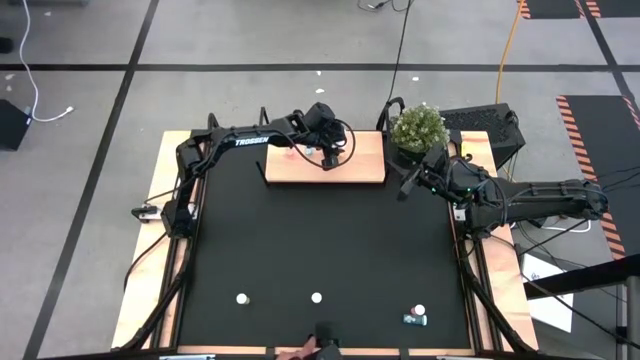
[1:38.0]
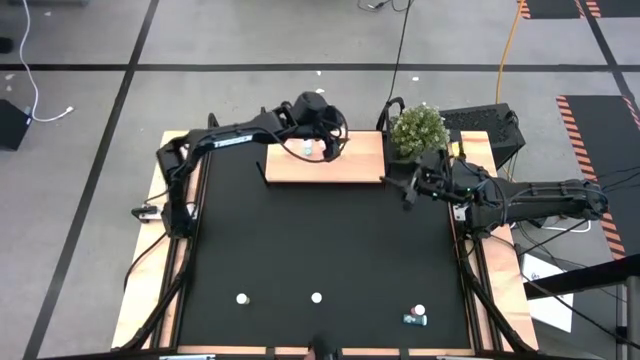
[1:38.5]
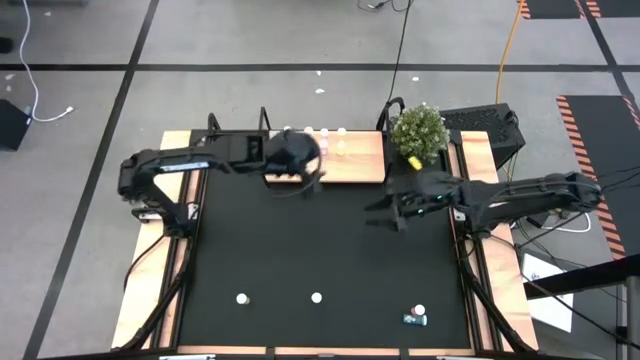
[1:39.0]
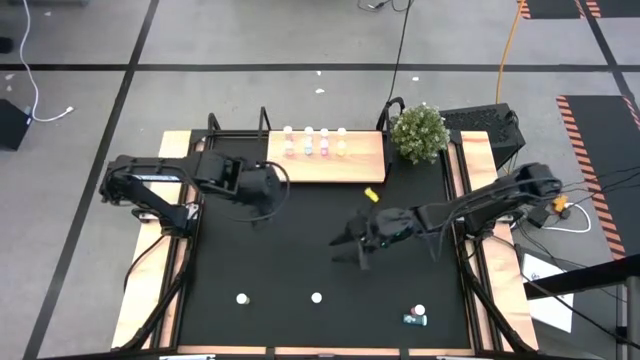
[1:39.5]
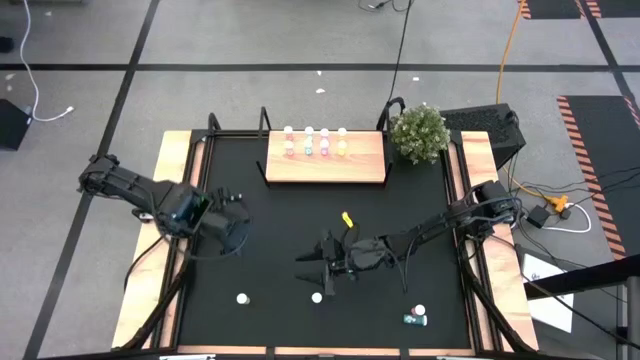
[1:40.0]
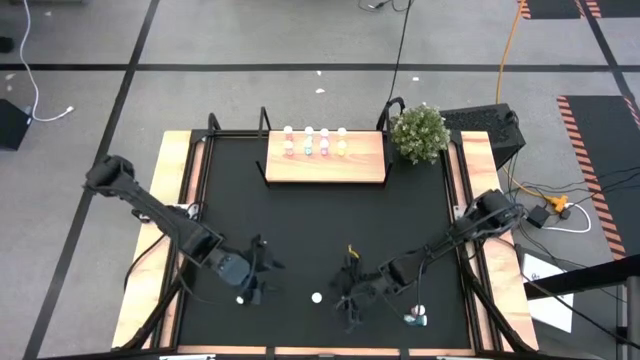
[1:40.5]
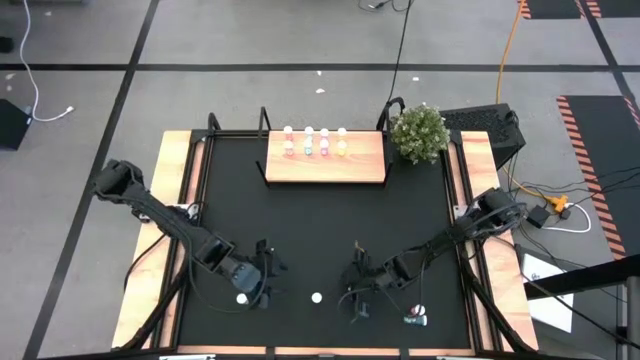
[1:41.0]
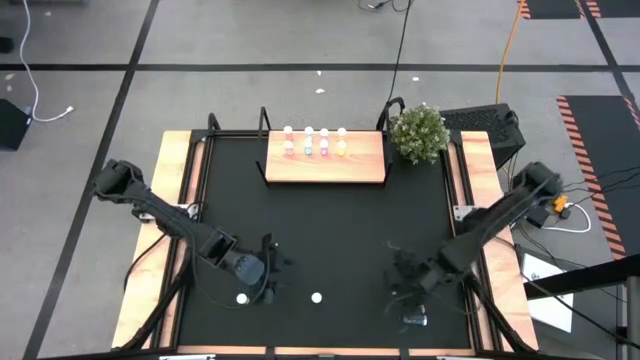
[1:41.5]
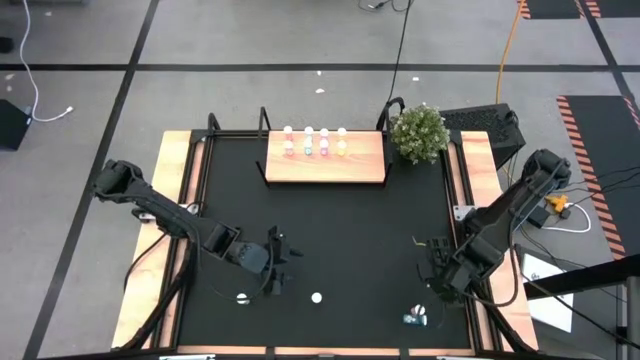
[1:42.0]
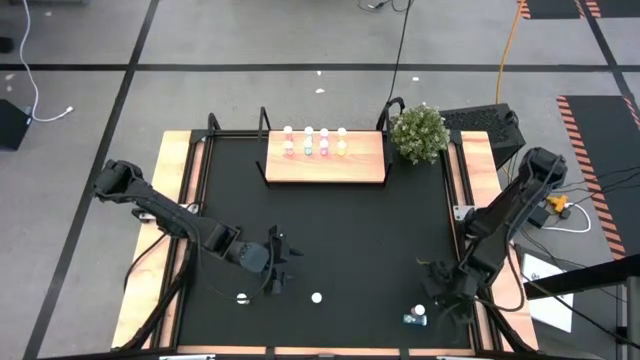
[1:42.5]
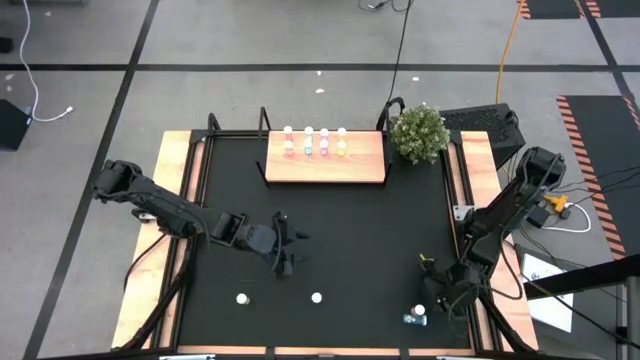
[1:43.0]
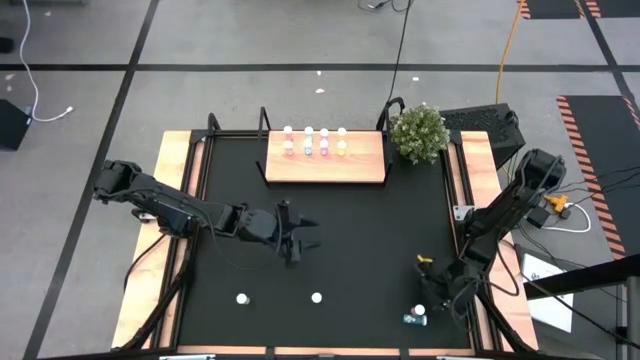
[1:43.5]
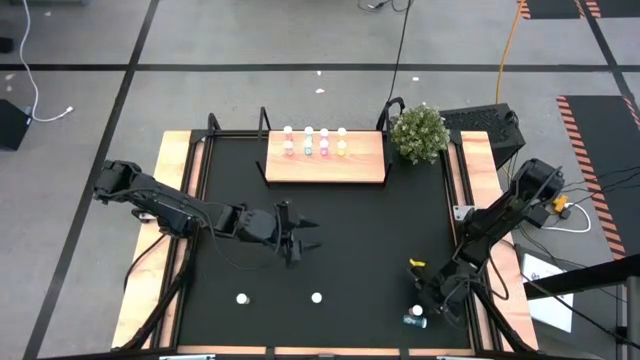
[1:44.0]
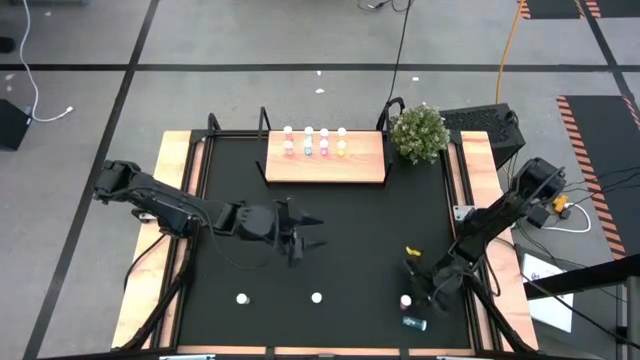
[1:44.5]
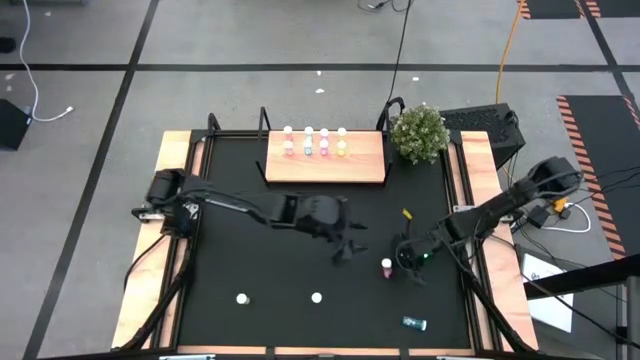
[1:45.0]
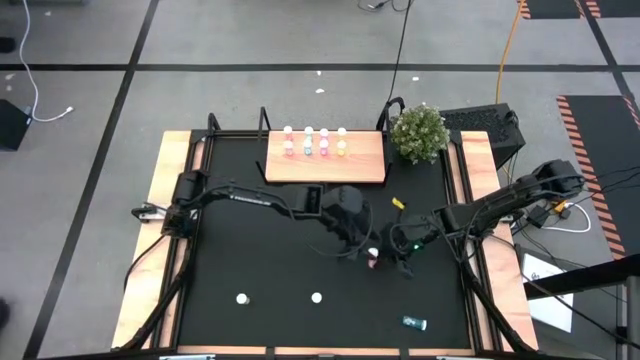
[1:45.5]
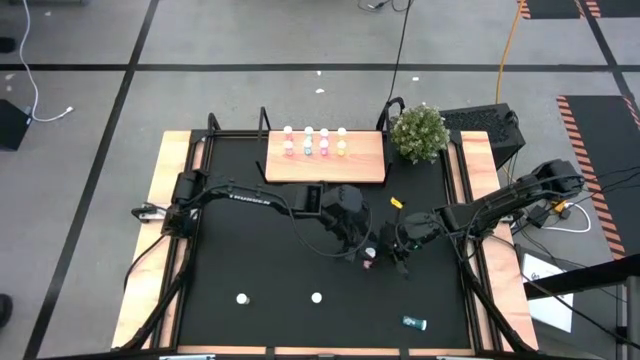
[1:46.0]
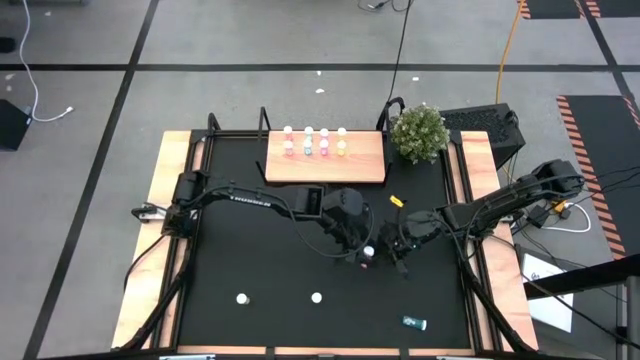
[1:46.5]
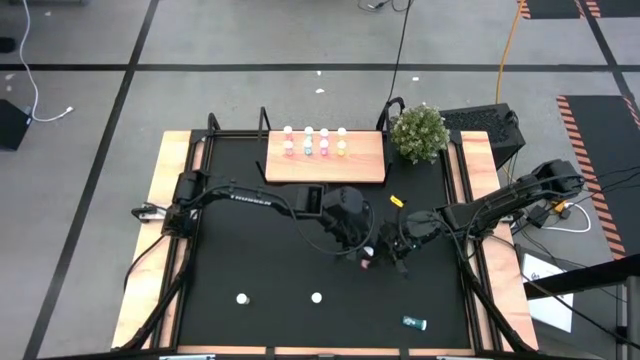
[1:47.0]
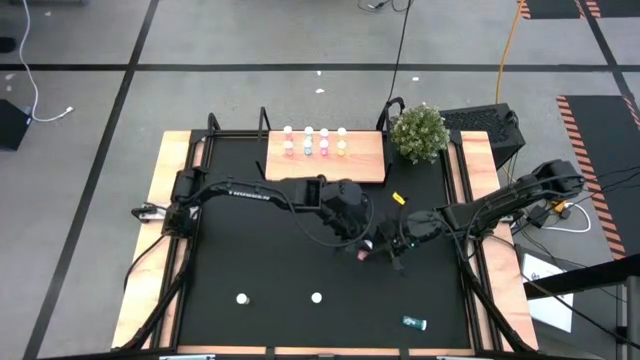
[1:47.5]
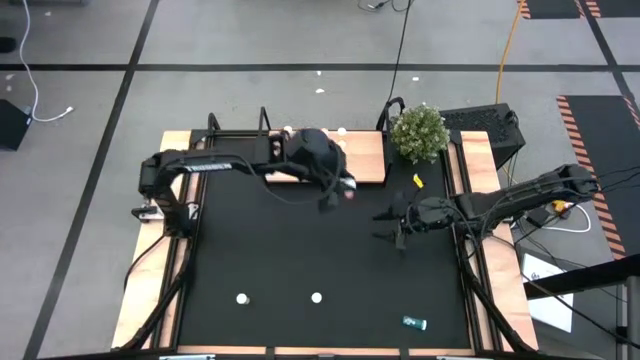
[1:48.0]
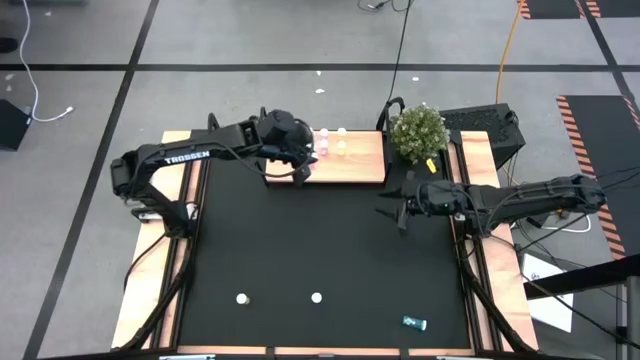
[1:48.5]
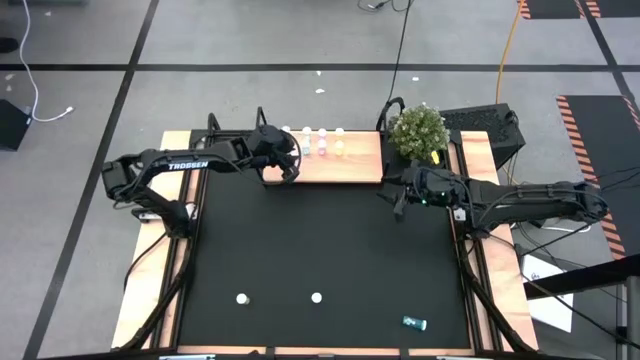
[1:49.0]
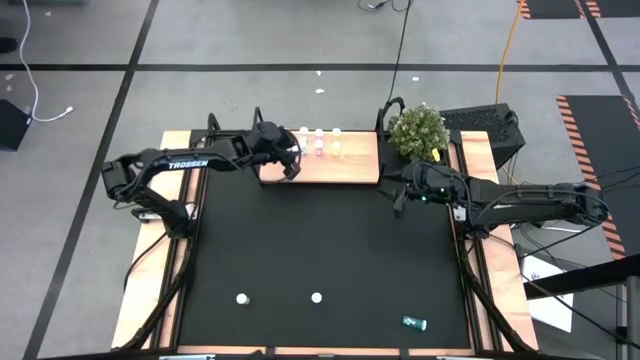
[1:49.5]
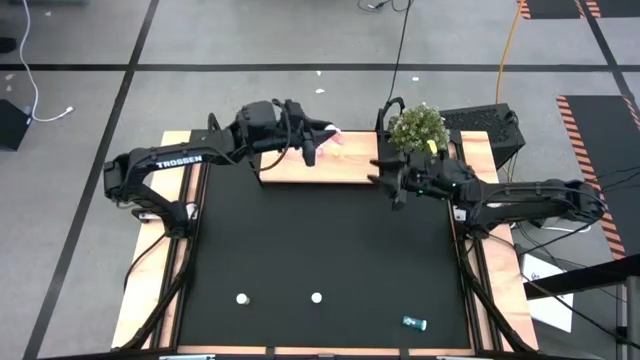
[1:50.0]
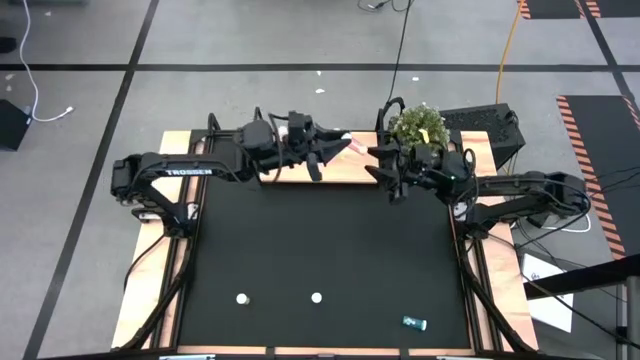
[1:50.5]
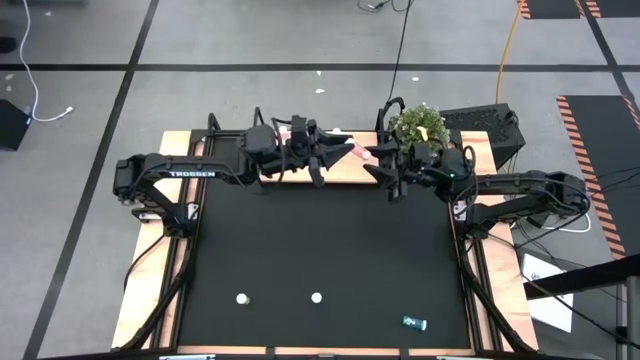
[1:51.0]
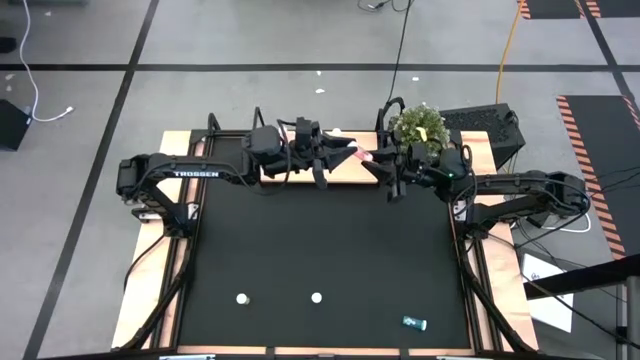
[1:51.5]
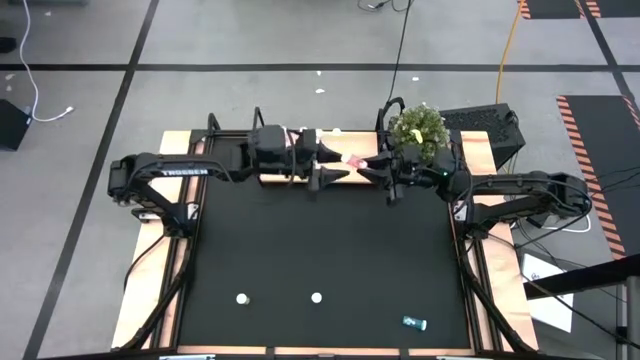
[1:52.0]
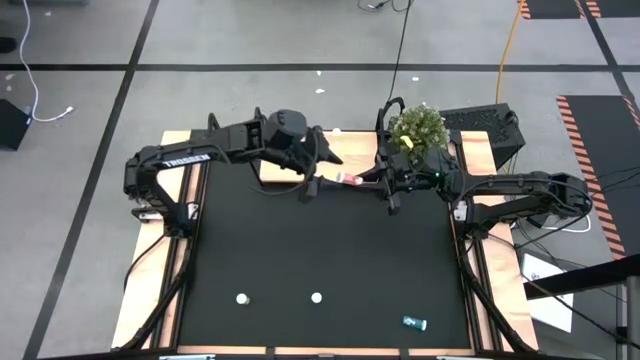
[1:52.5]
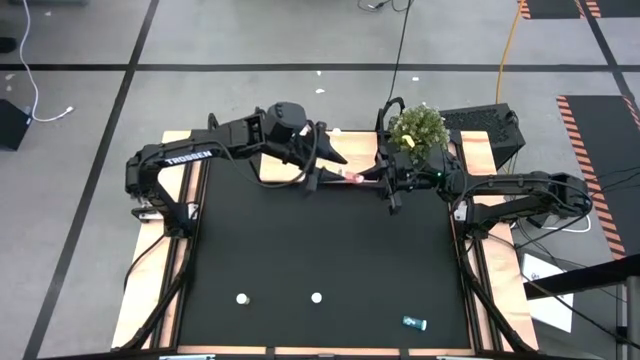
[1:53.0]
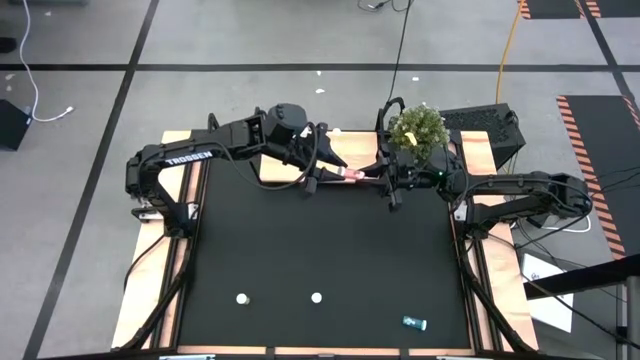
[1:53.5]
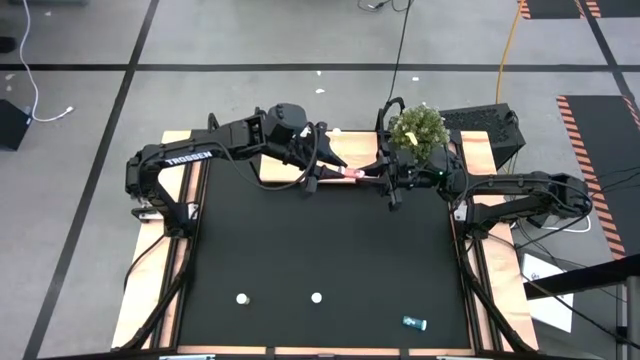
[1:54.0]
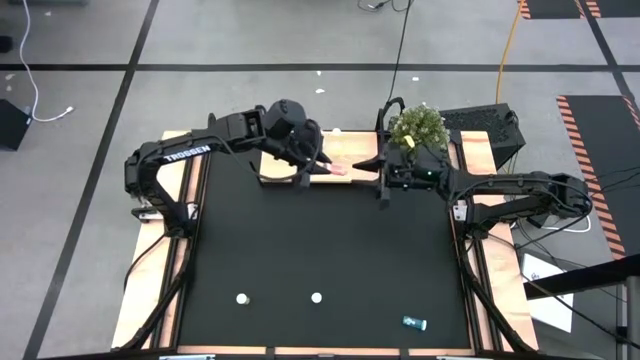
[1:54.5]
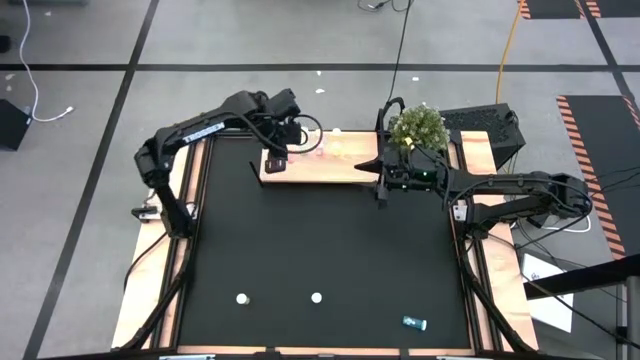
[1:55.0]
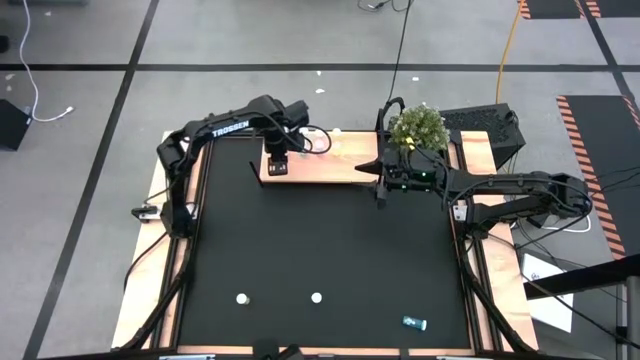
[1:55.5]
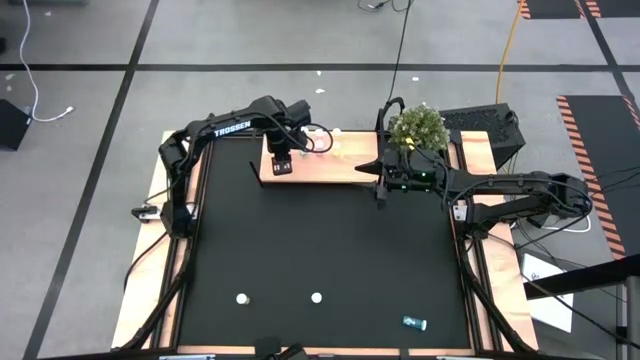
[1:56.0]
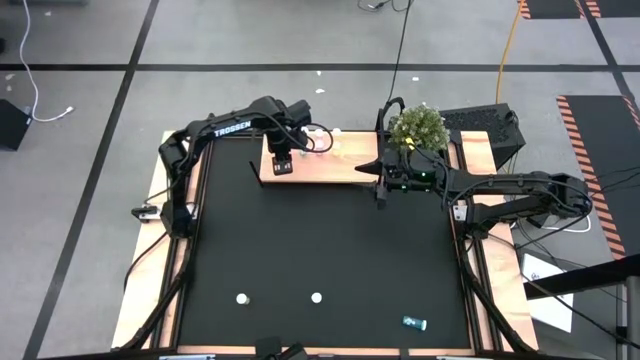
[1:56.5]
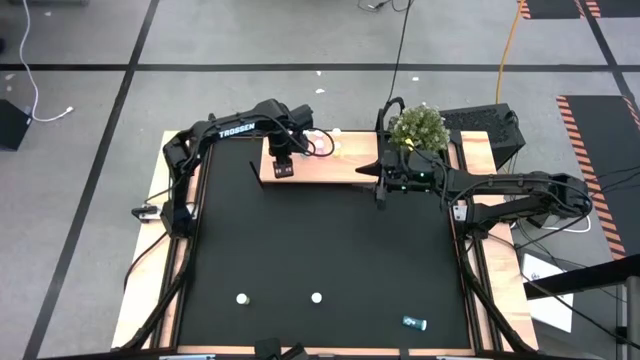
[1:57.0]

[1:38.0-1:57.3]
Task: Pick and place medicine bottles onto shelf by color
Put the orange pill bottle on the shelf aligned with the other orange pill bottles

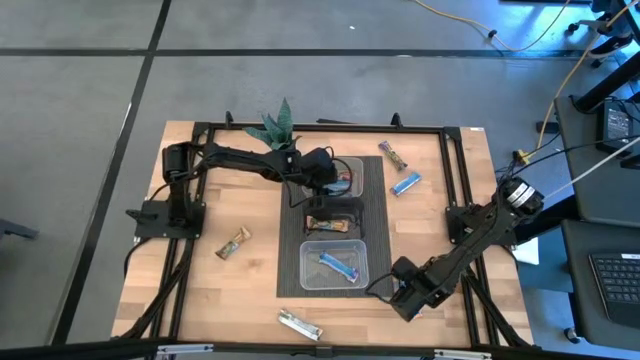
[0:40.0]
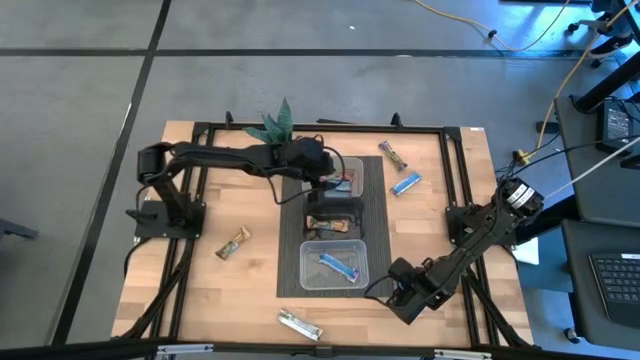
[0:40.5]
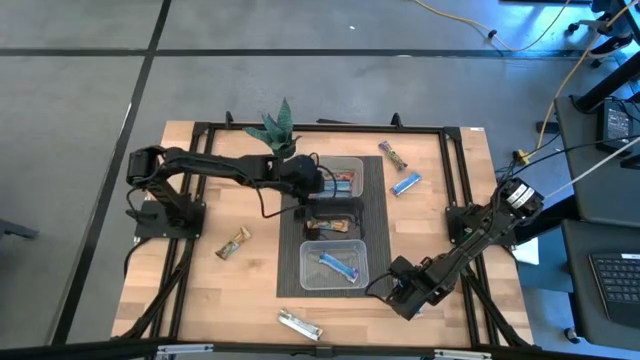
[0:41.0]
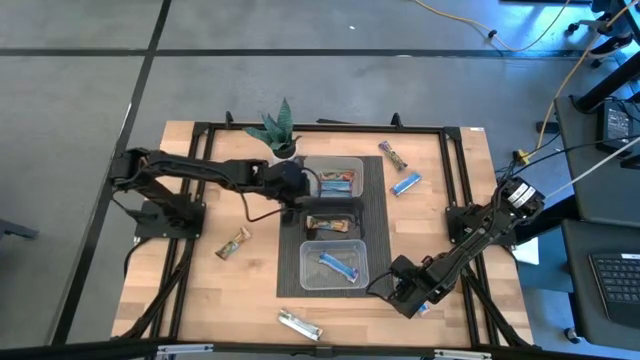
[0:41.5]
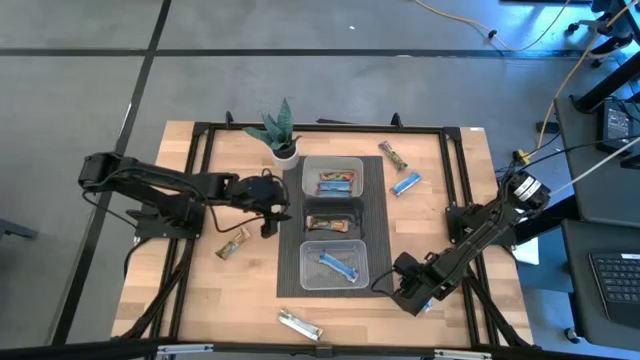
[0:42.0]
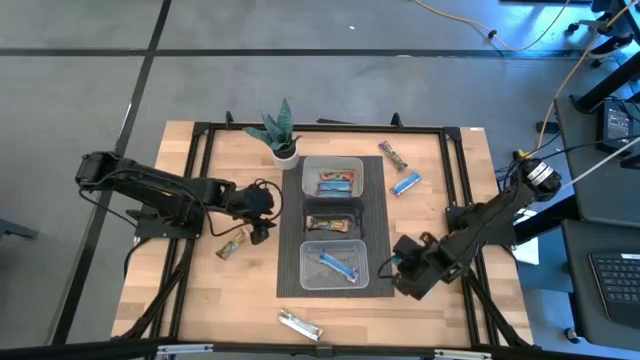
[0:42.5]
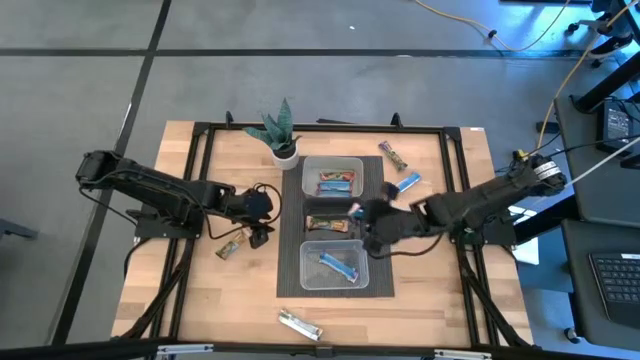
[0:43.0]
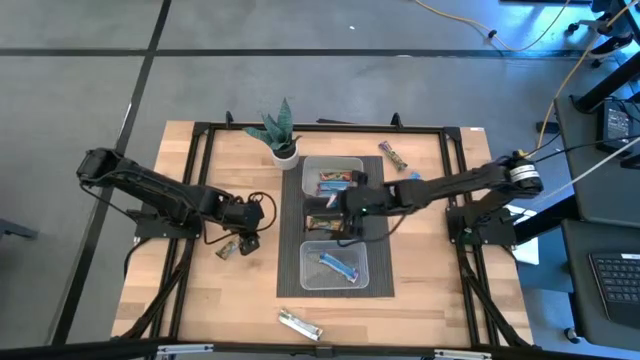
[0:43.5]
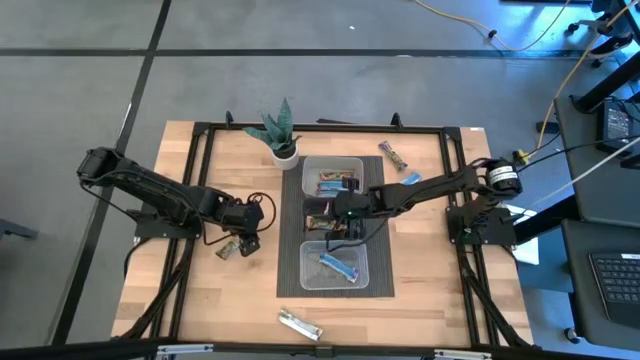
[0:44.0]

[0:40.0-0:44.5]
Task: Pick and place Granola Bars by type
Put the yellow granola bar into the black bin
